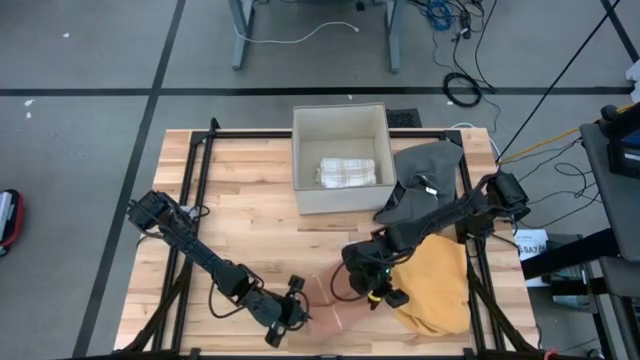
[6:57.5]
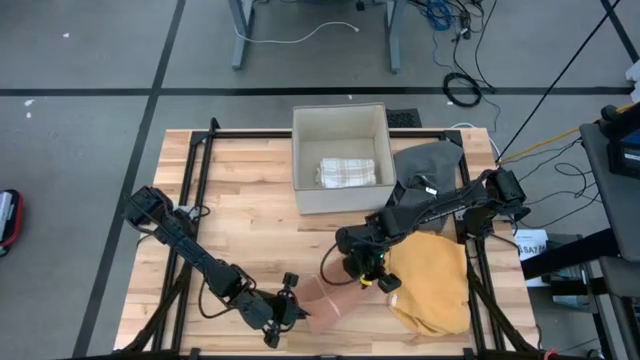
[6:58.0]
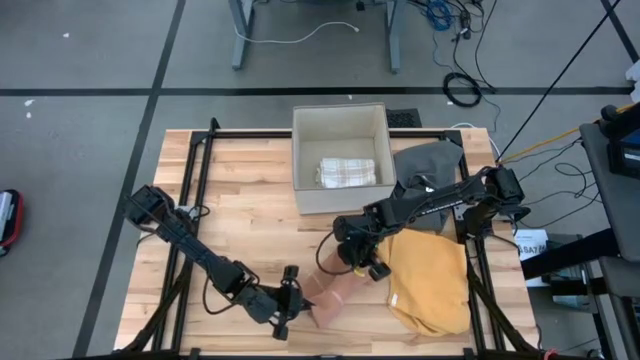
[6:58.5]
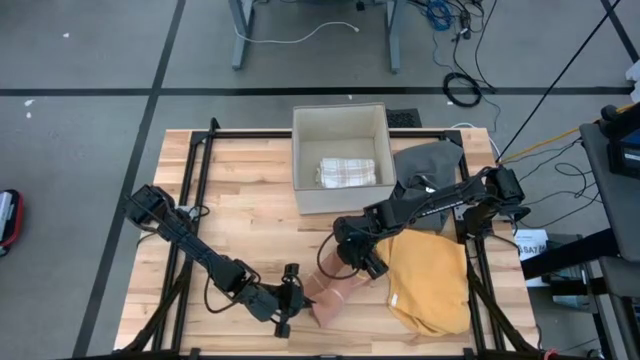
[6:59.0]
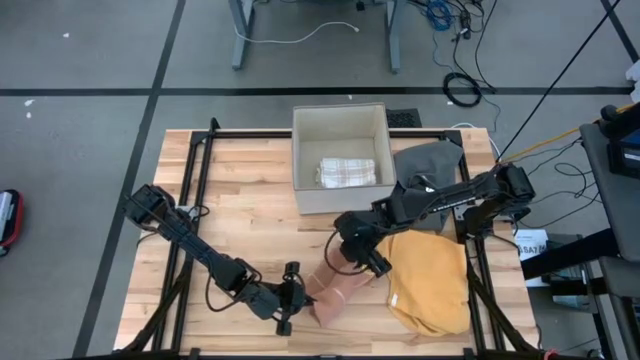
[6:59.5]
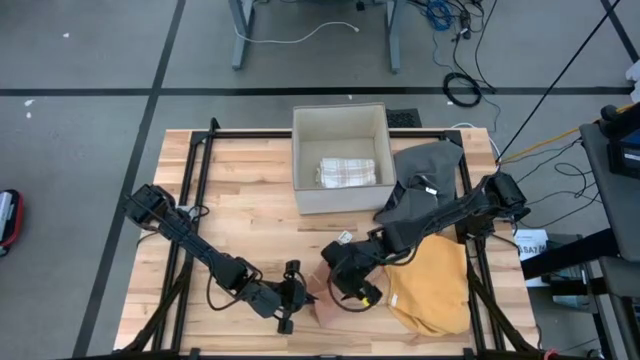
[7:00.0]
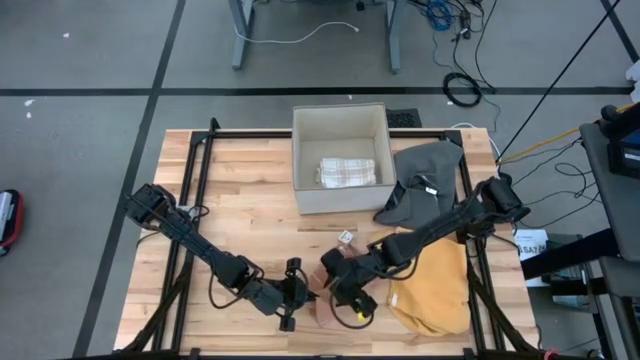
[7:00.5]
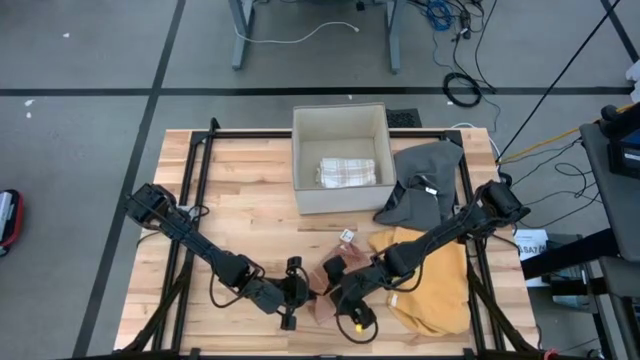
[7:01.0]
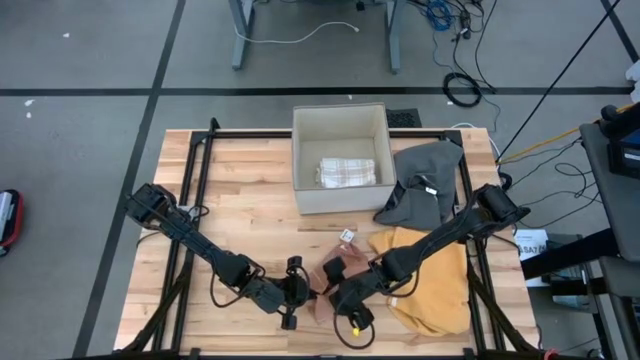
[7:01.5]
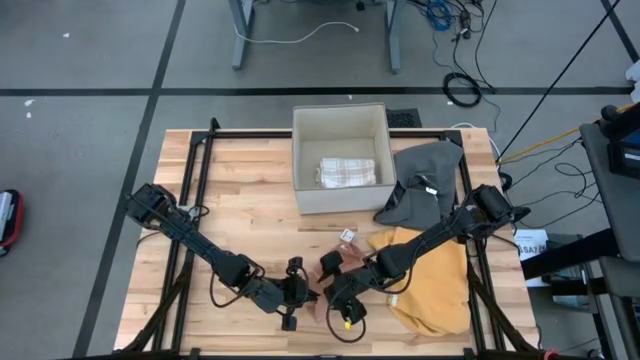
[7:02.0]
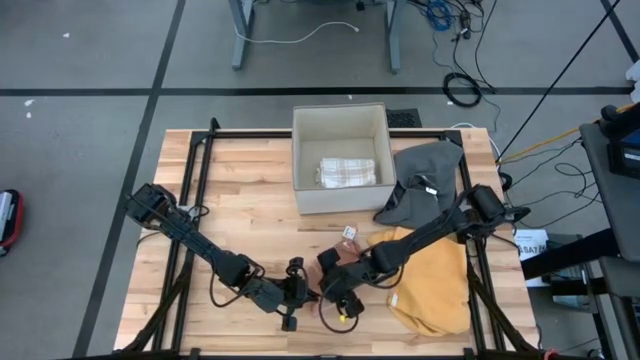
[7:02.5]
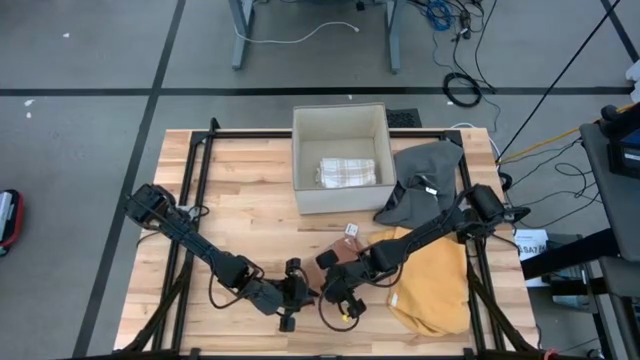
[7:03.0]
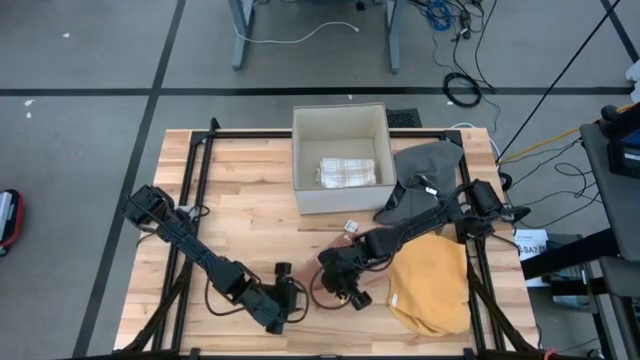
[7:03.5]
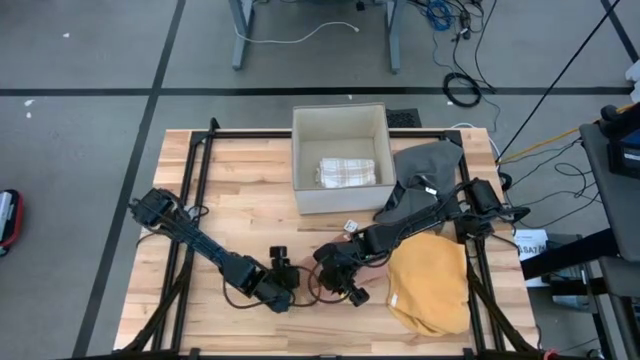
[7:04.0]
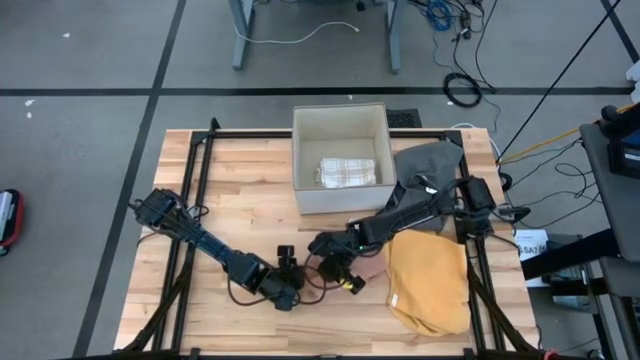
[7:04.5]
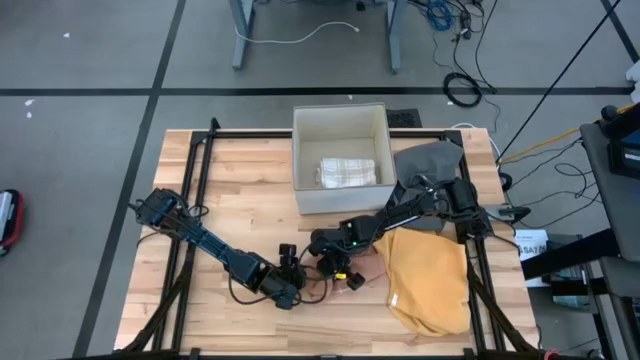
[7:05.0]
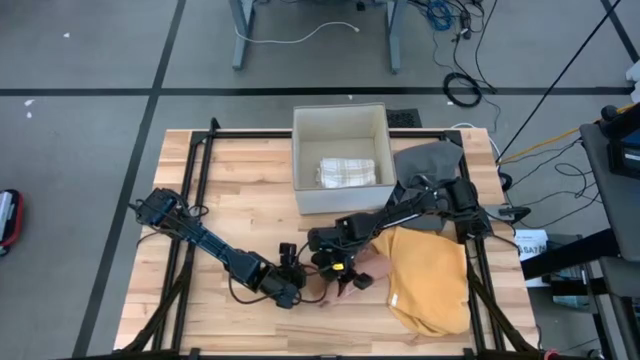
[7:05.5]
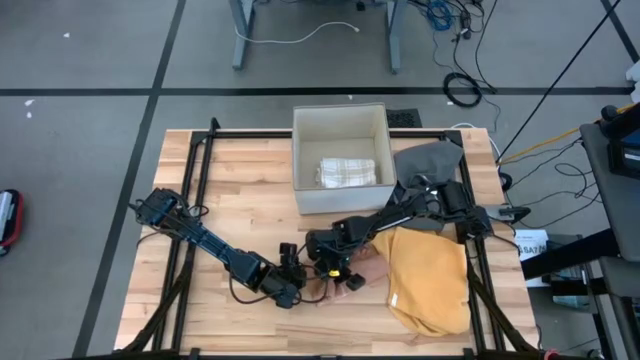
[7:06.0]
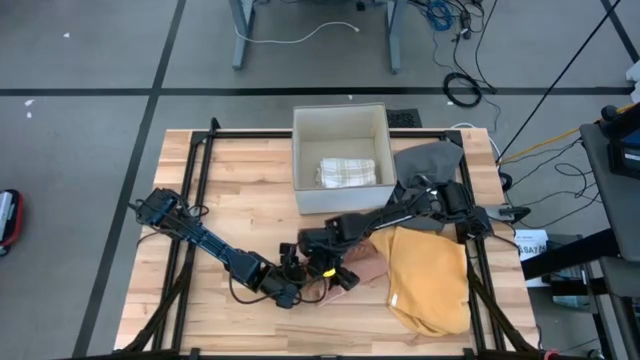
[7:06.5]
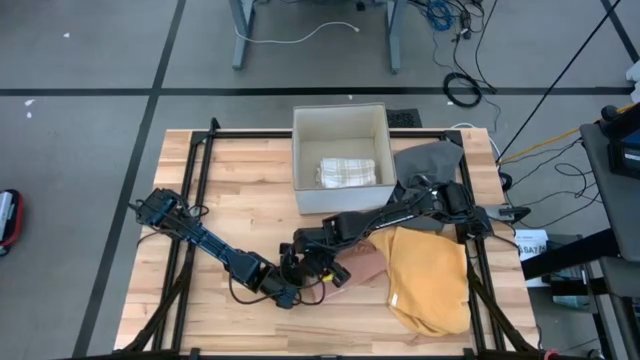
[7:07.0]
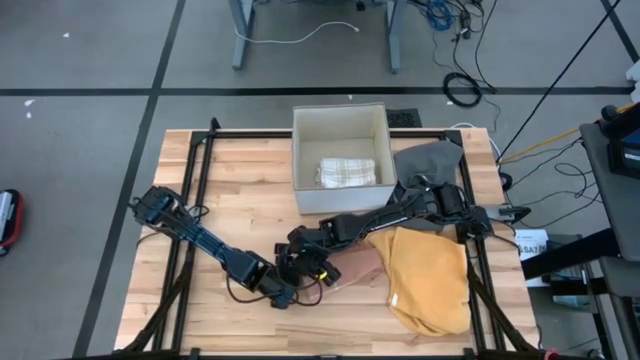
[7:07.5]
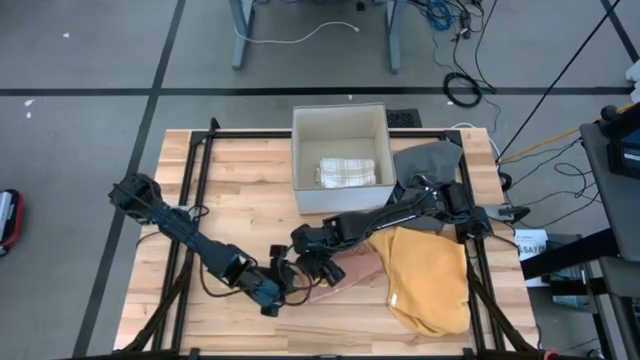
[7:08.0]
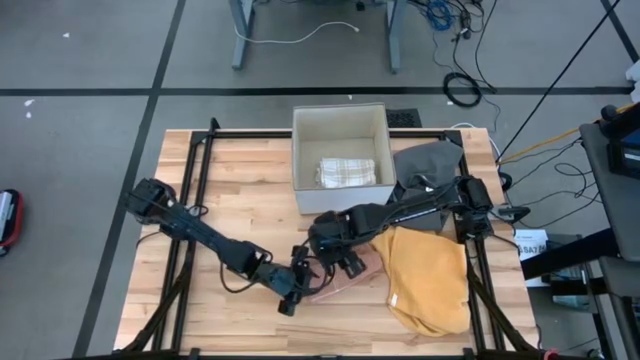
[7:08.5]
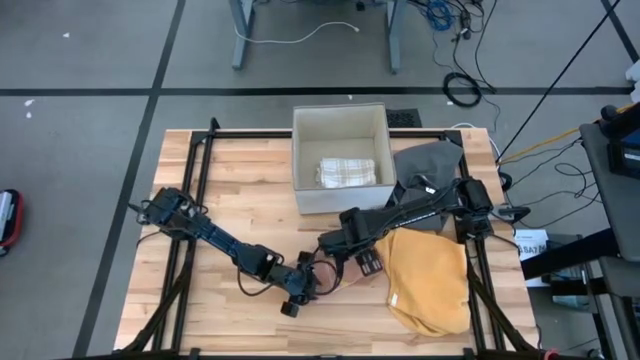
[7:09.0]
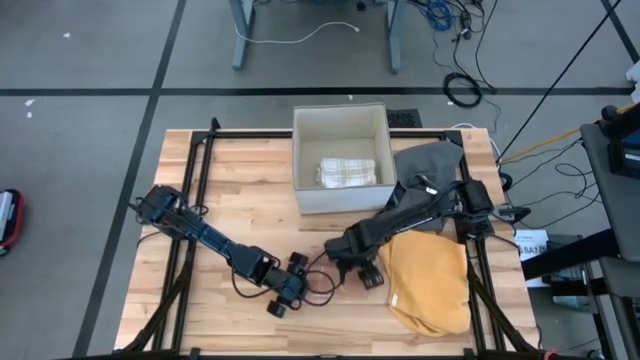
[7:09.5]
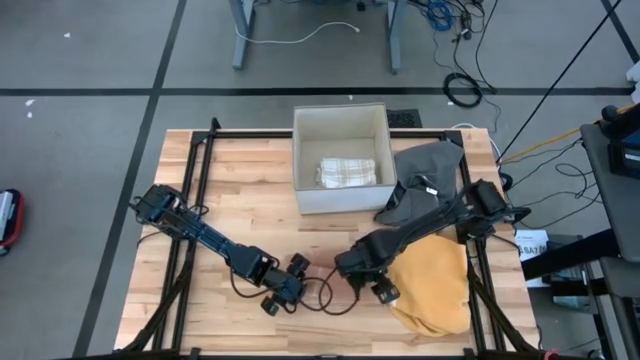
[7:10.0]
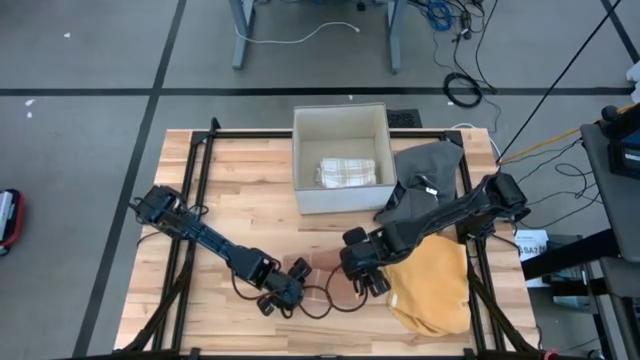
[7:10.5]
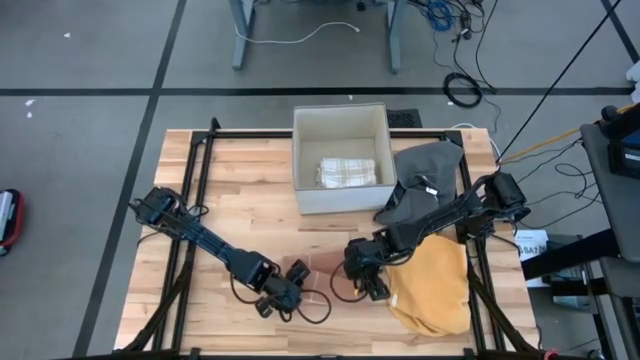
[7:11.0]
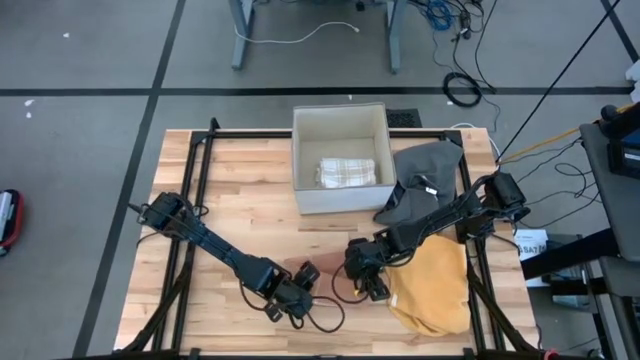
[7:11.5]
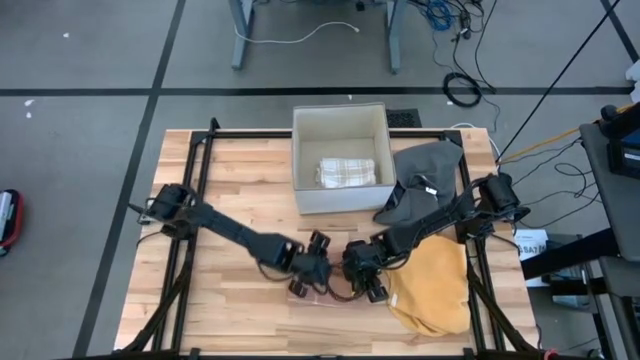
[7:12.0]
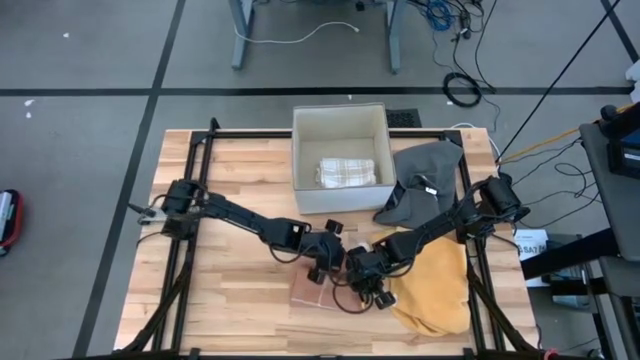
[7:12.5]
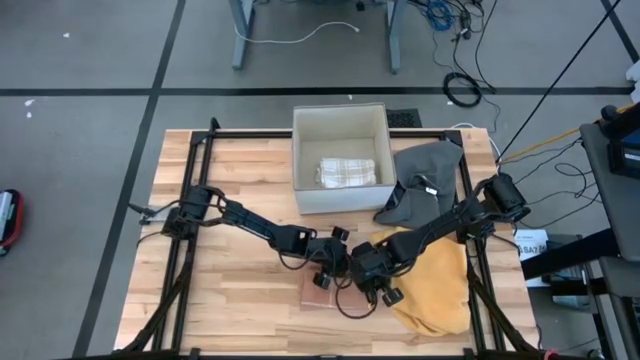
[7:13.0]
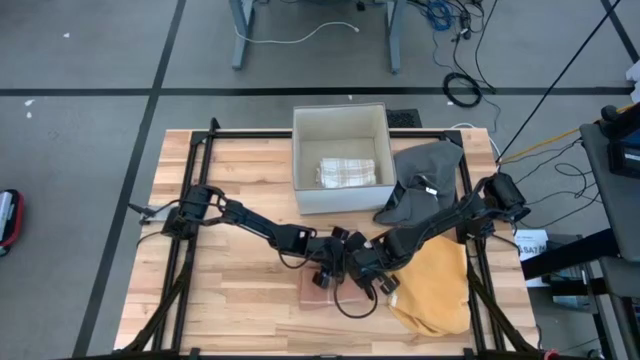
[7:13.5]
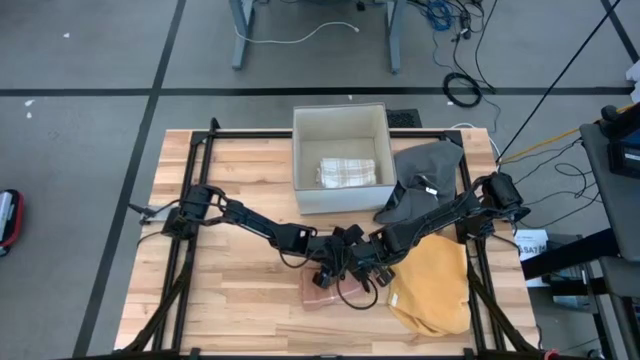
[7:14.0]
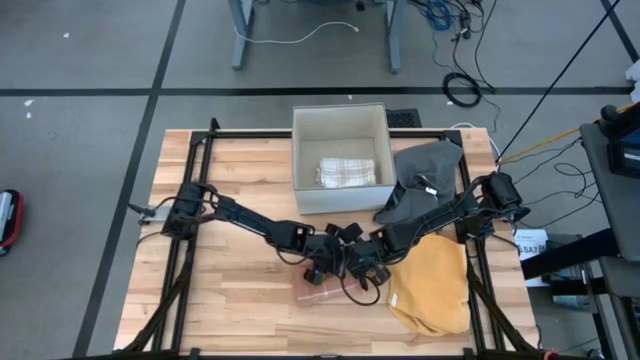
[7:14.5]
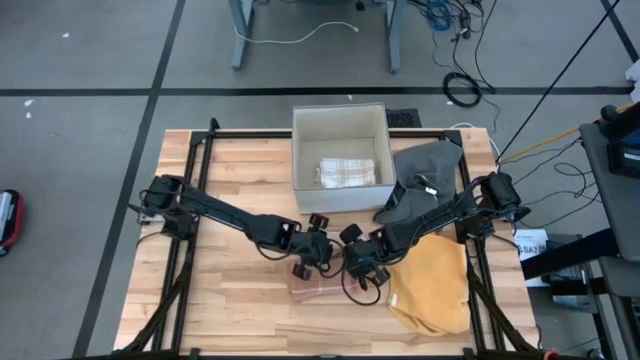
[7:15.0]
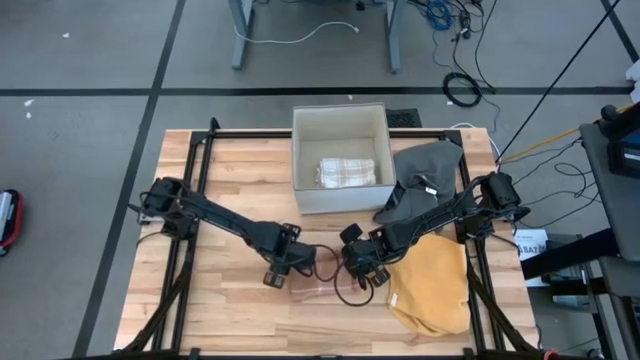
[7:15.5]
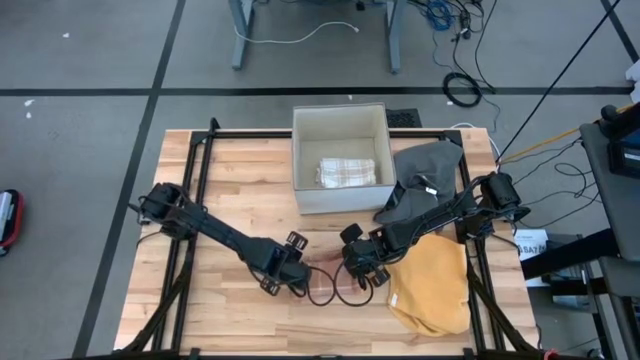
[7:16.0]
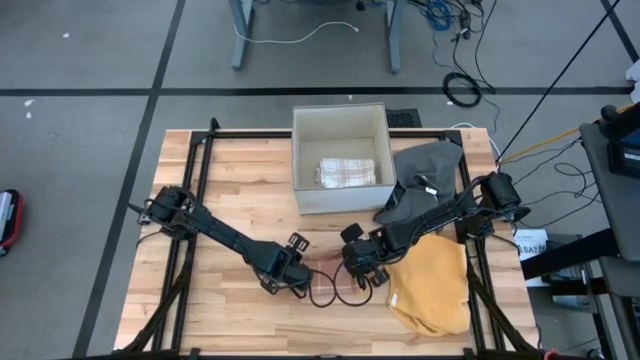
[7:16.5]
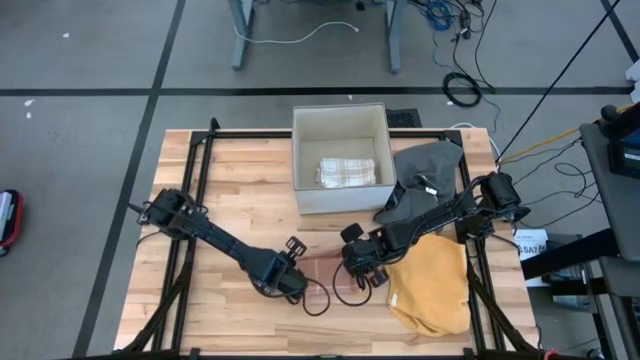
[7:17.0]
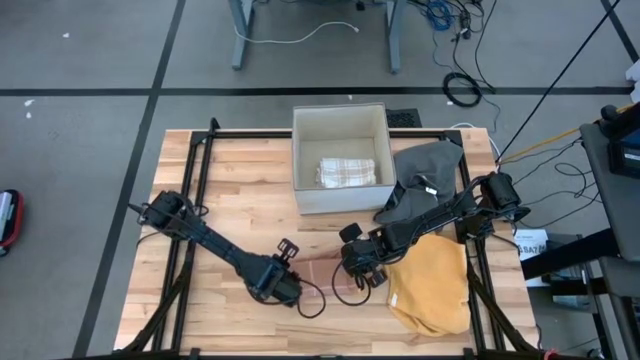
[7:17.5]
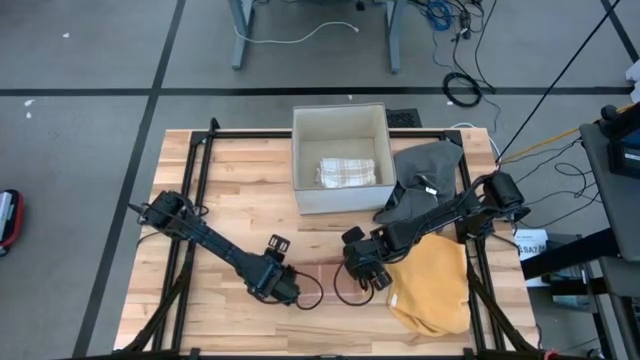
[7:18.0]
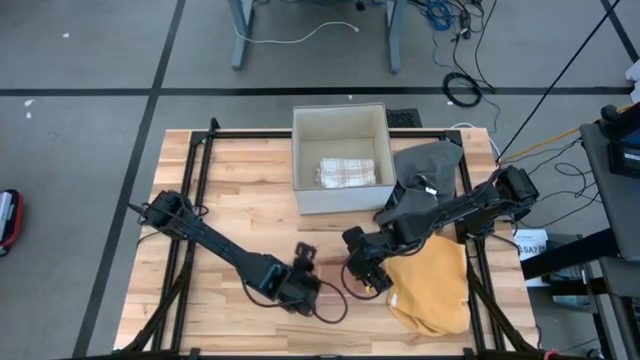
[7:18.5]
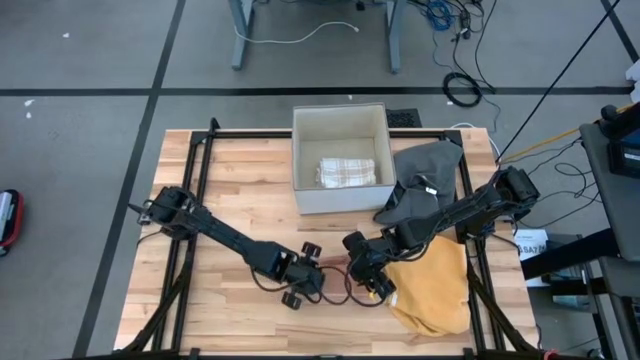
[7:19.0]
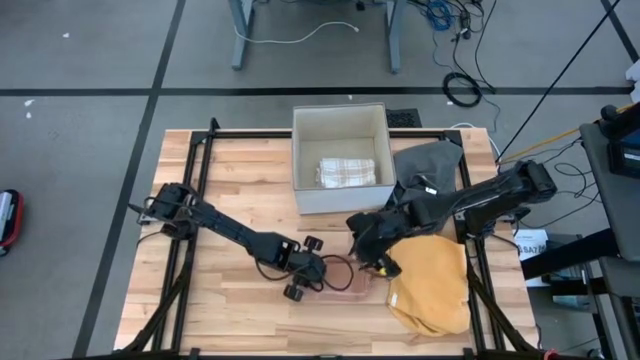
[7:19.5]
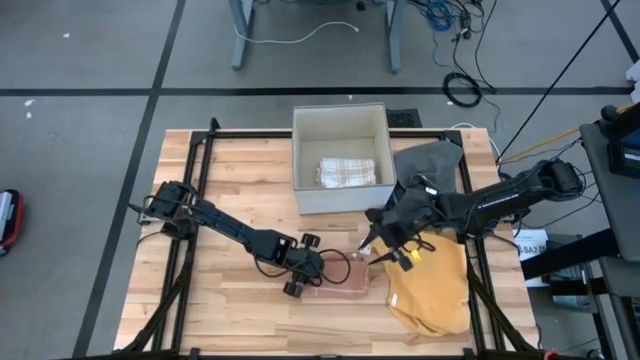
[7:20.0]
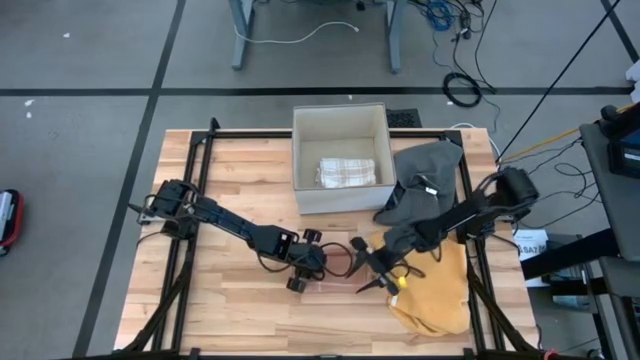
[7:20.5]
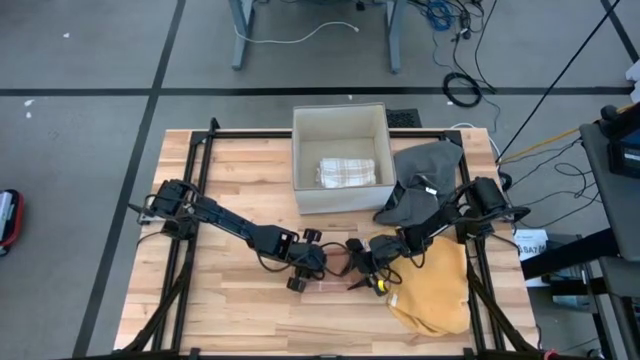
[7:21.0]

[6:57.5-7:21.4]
Task: Fold towel
Fold the light brown towel
